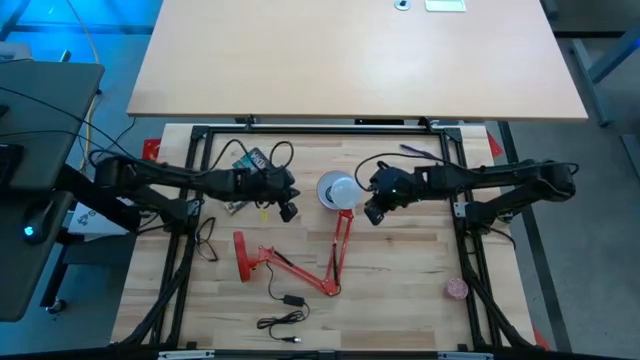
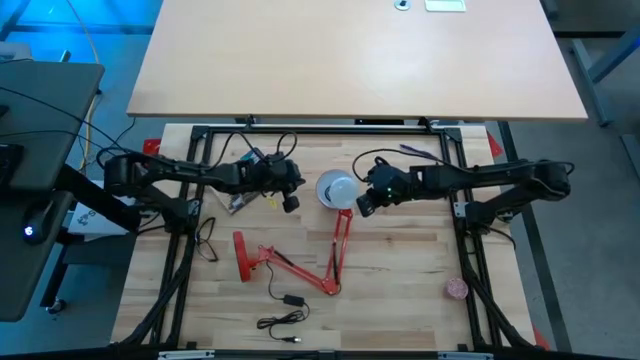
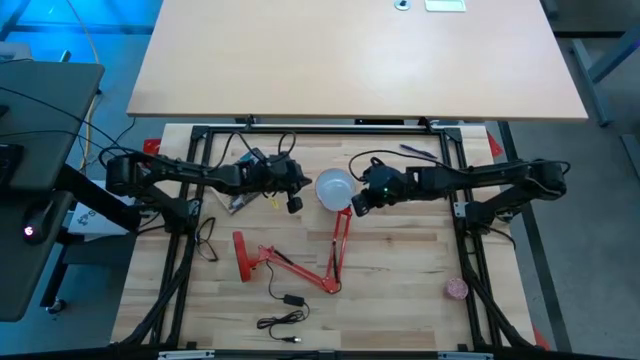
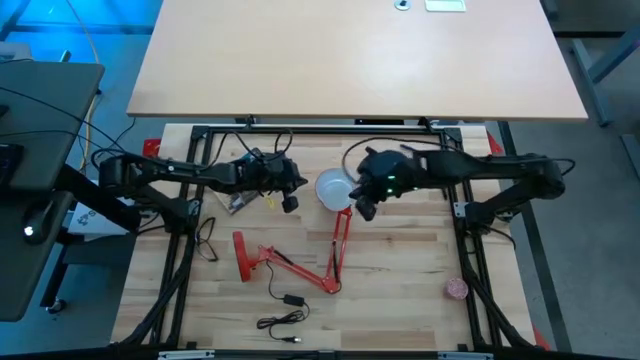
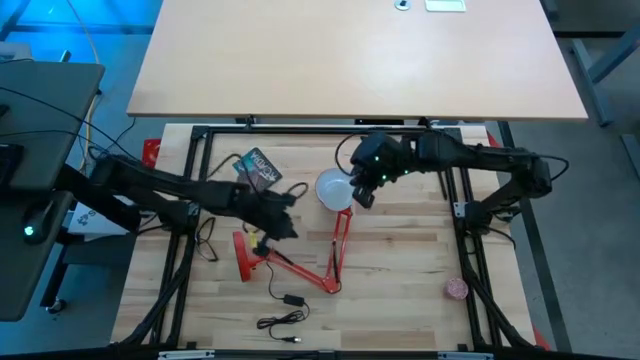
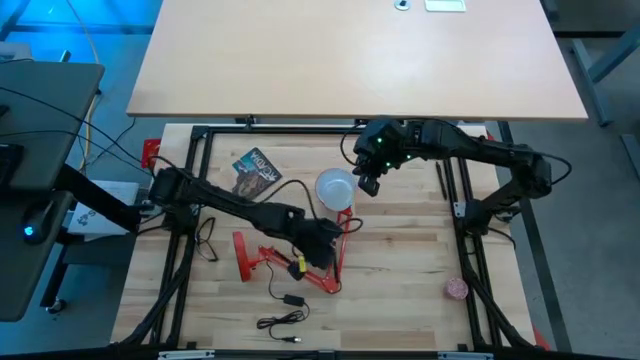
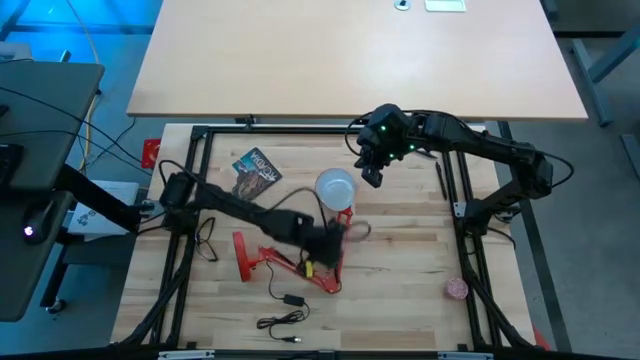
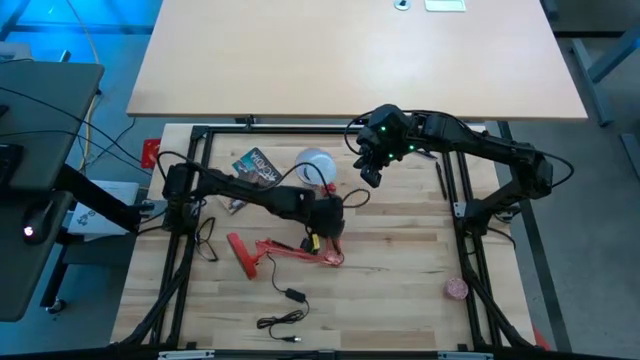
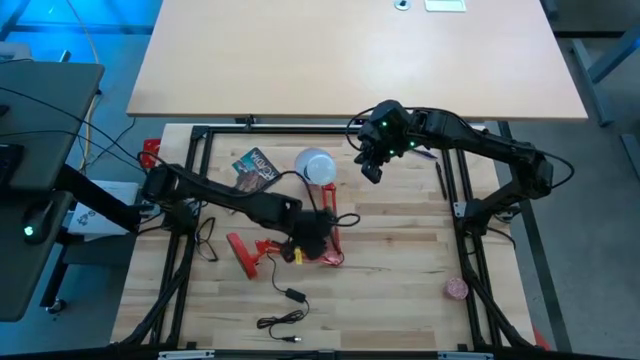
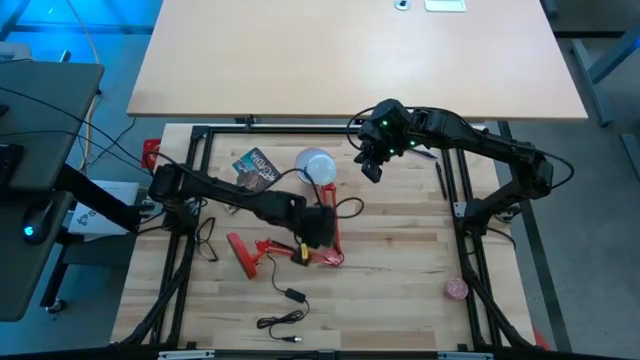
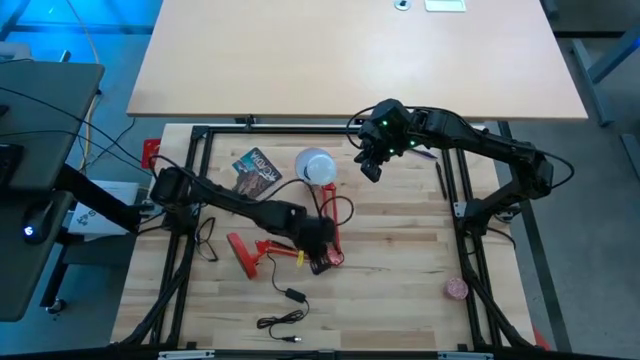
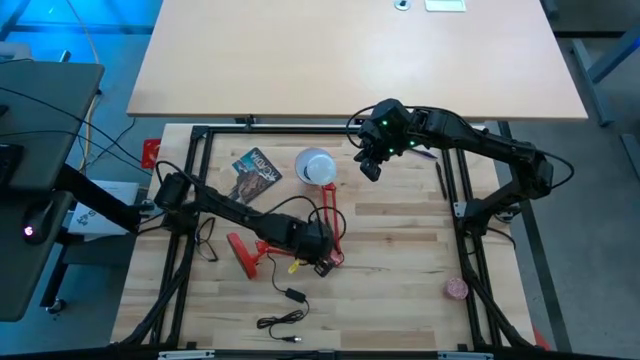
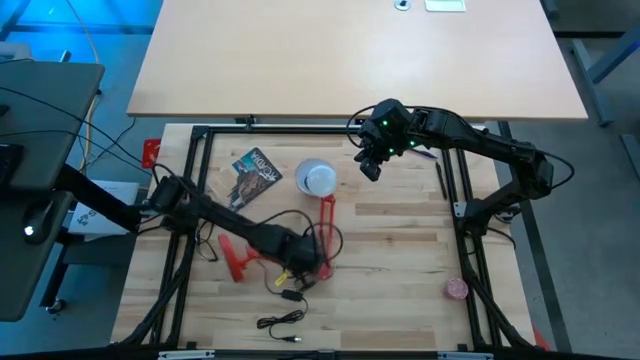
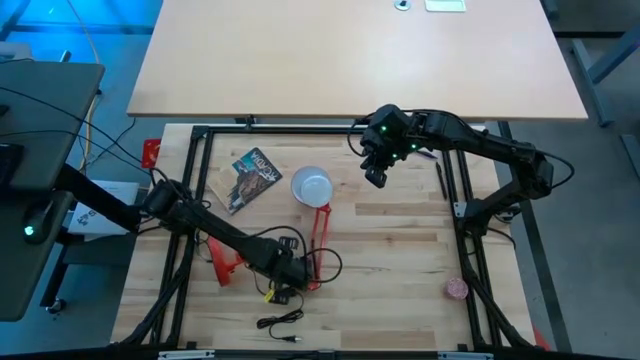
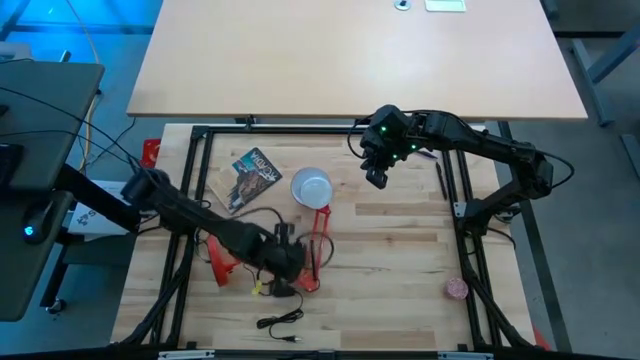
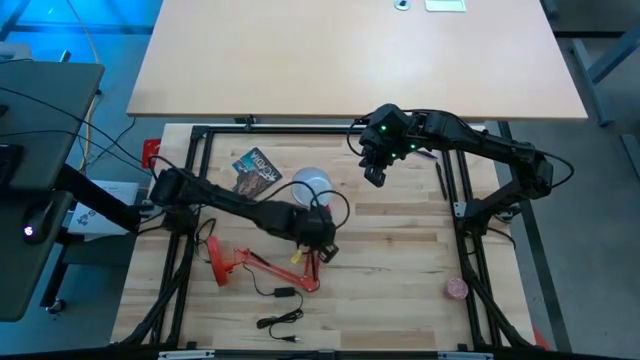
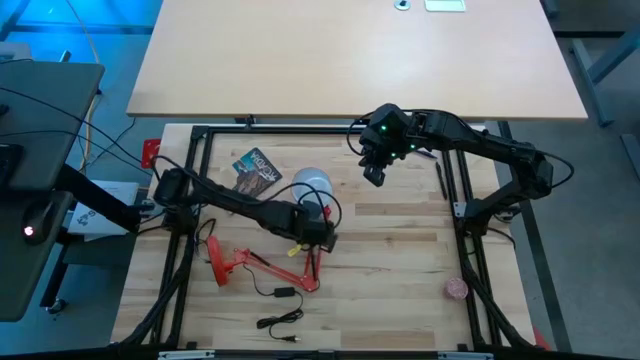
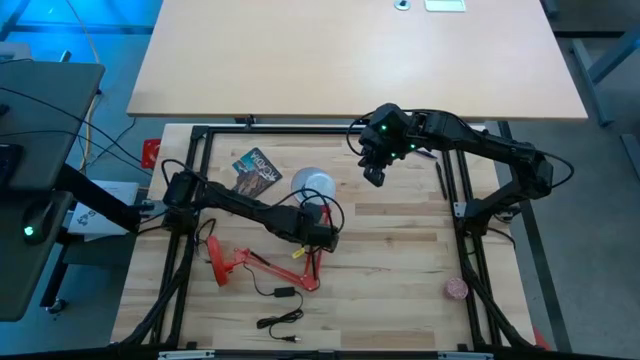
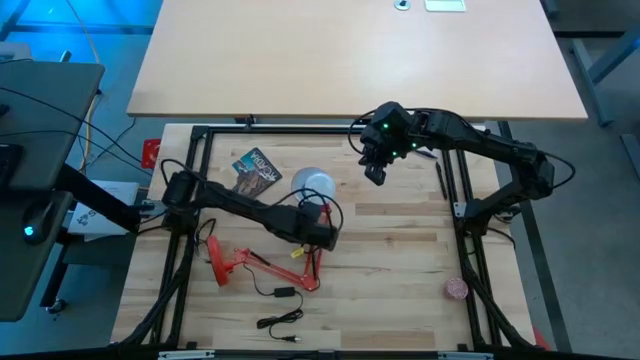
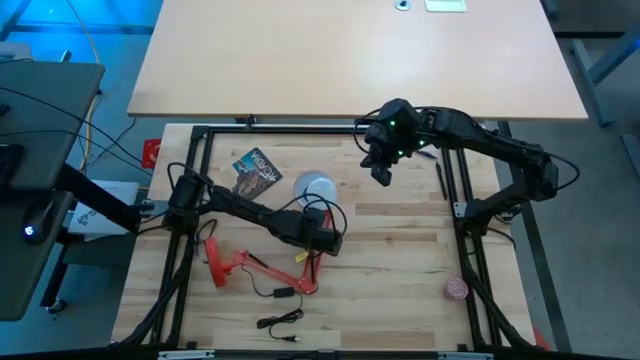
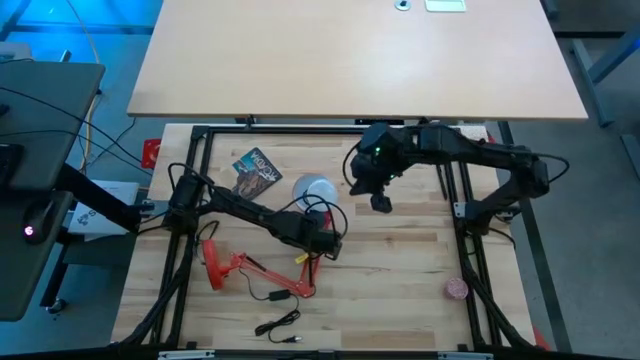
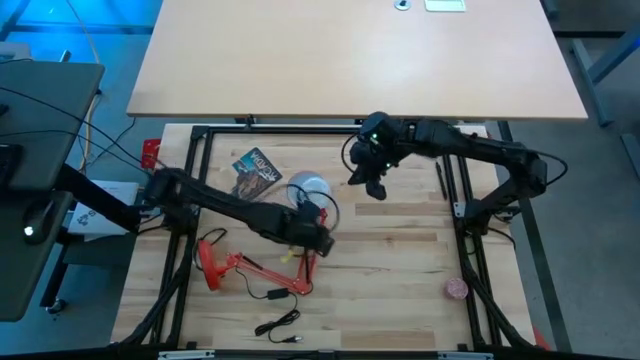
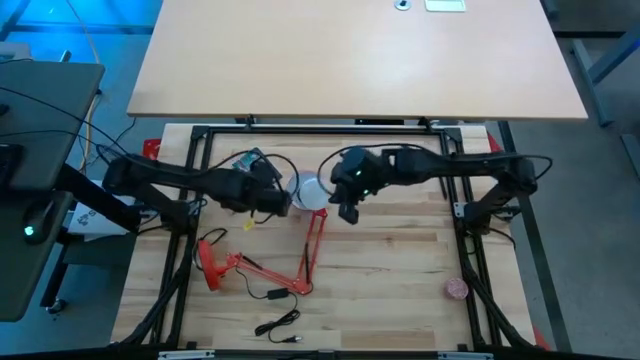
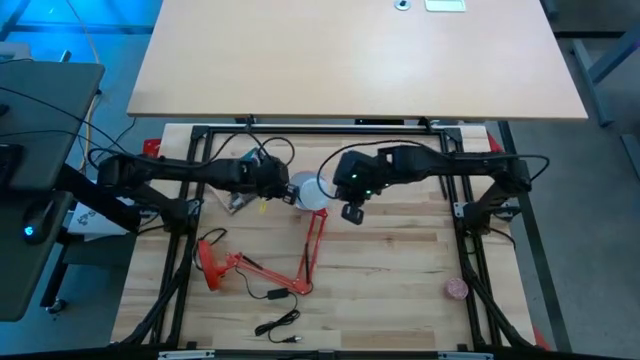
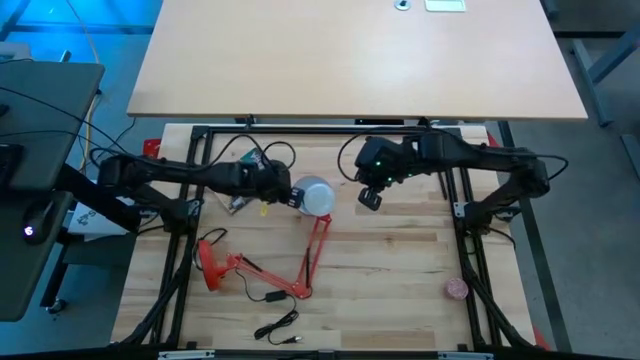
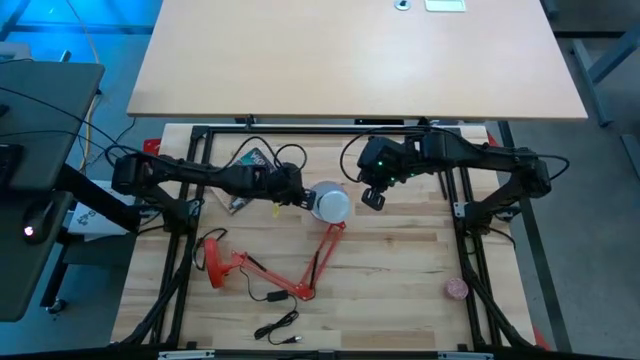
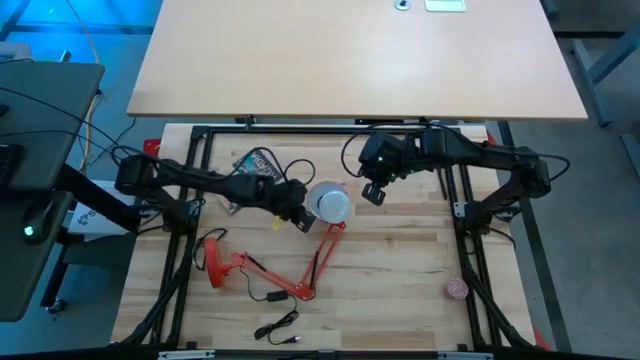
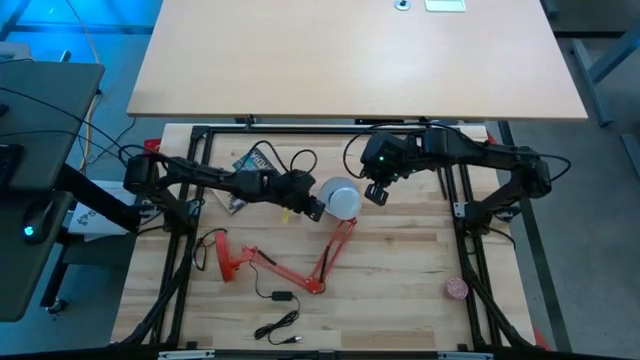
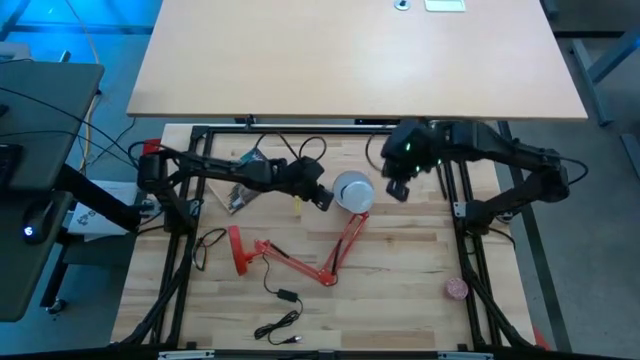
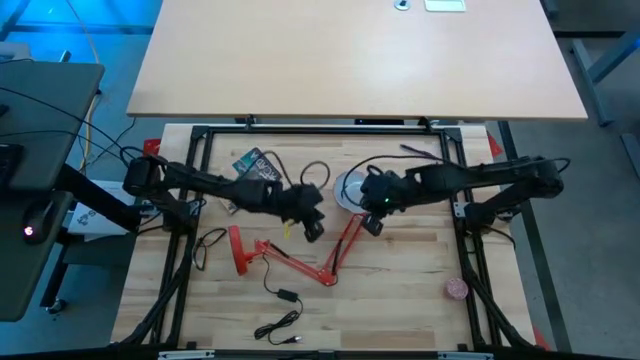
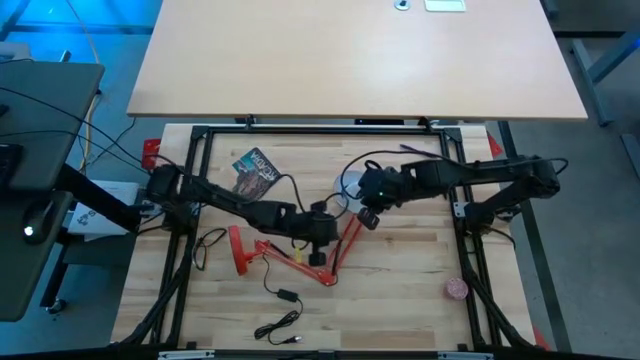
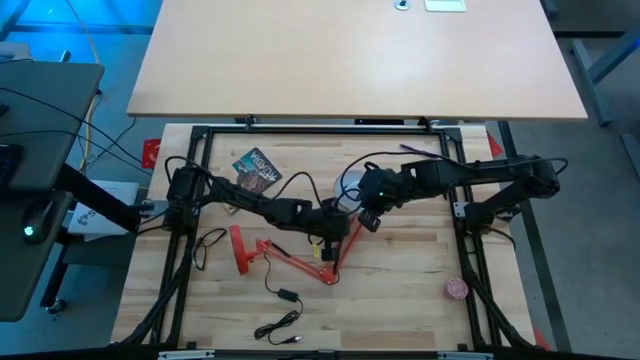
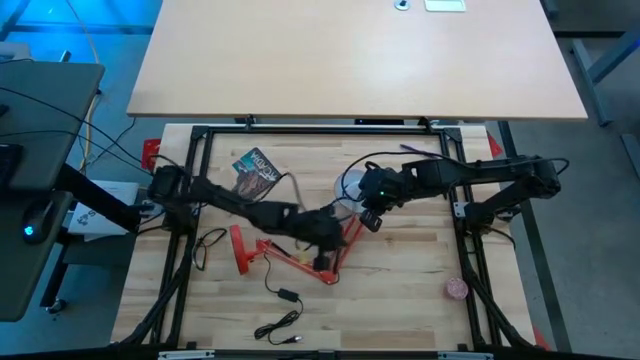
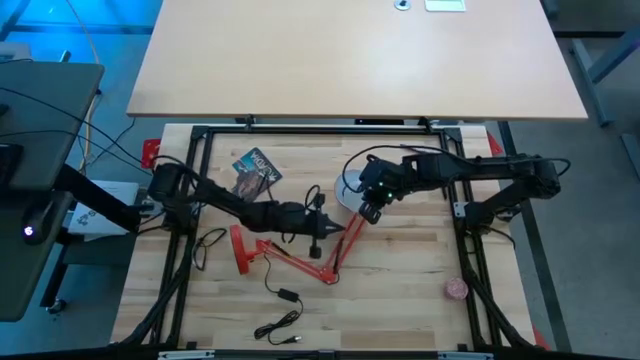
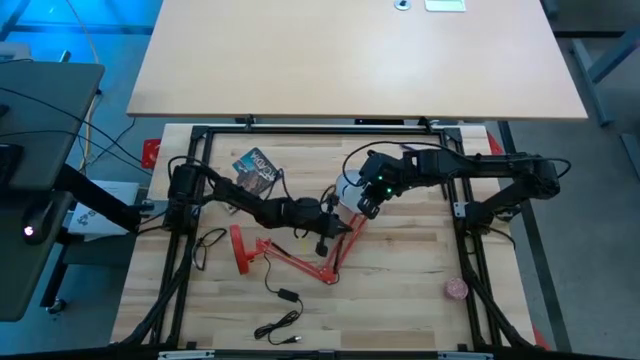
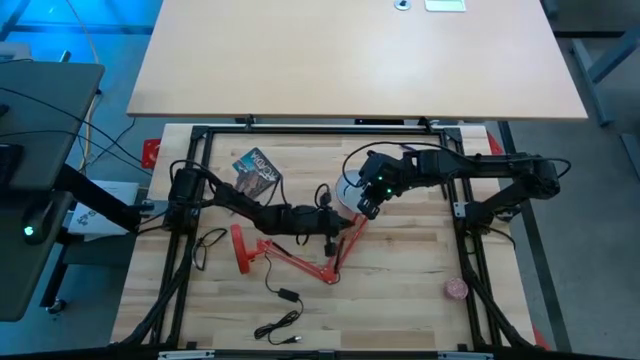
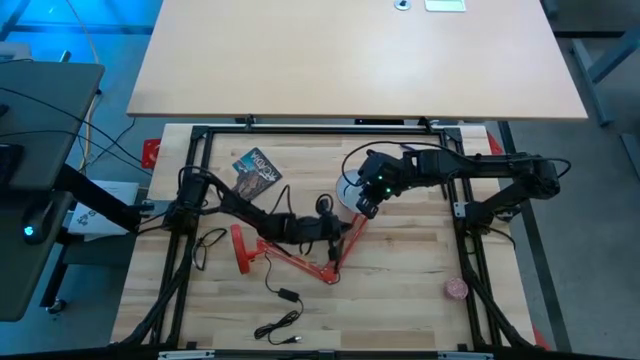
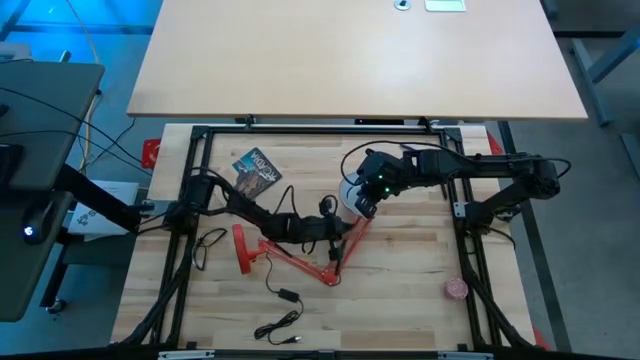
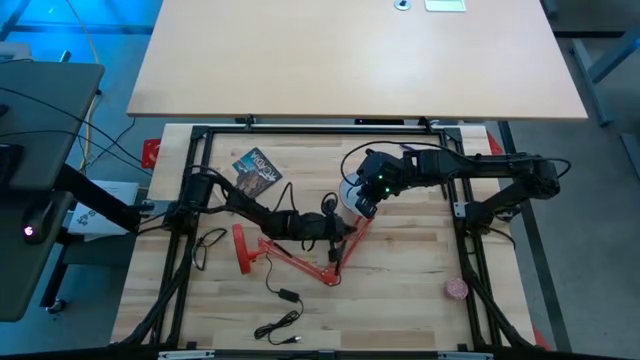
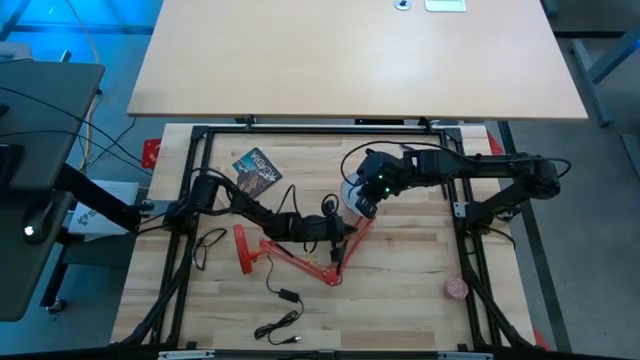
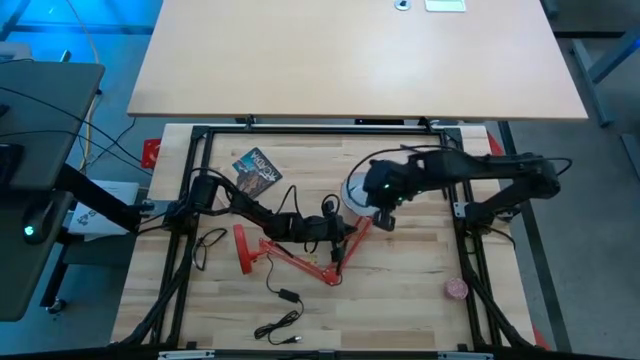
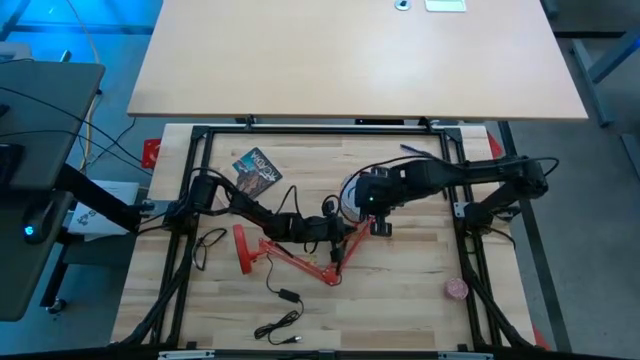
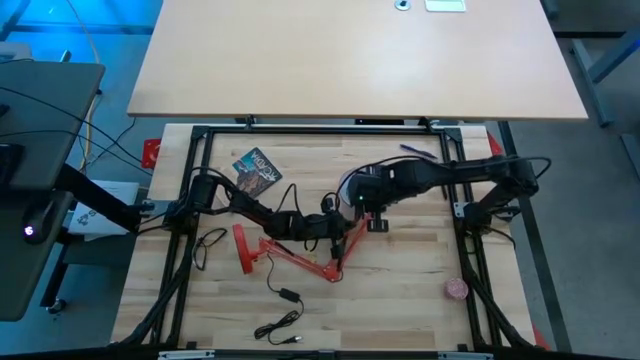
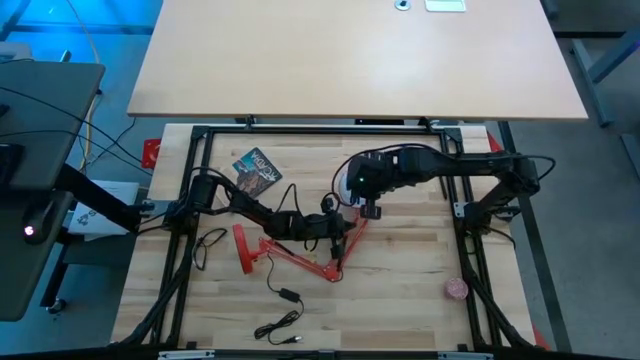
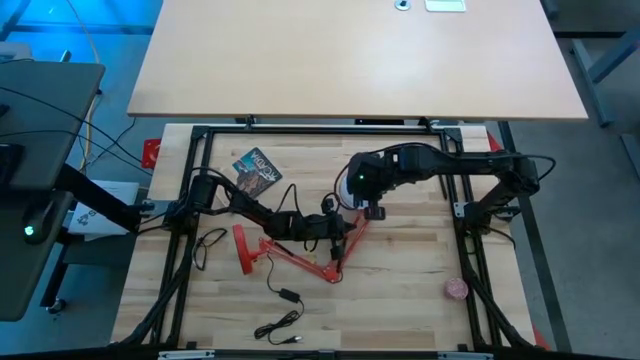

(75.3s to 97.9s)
Task: Screw lightbulb
Insert the lightbulb into the red lamp
